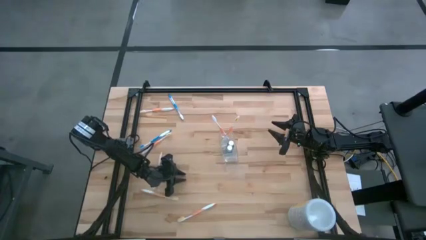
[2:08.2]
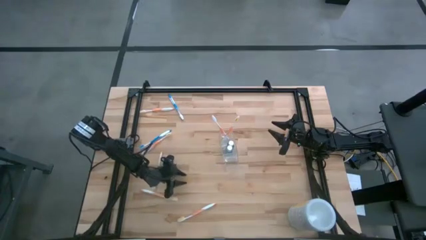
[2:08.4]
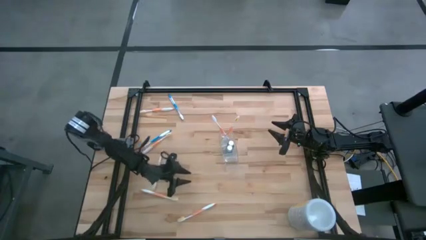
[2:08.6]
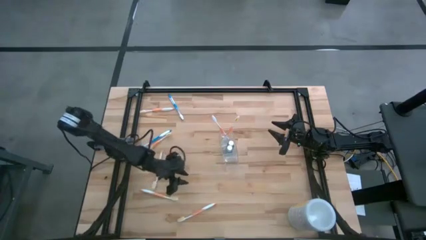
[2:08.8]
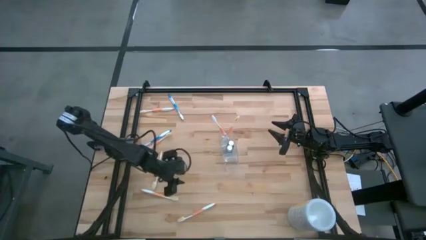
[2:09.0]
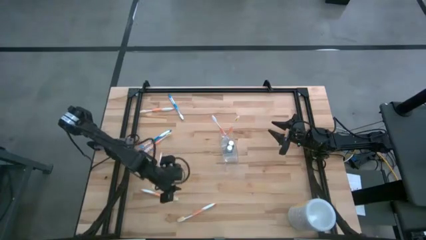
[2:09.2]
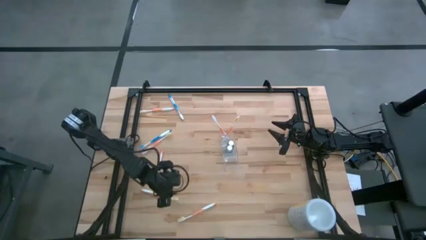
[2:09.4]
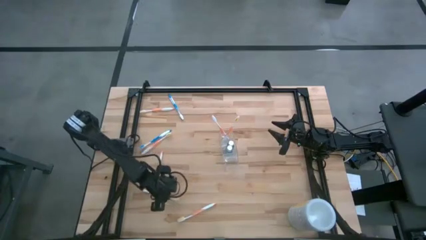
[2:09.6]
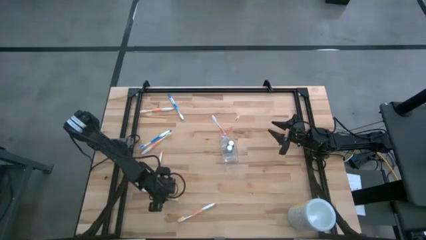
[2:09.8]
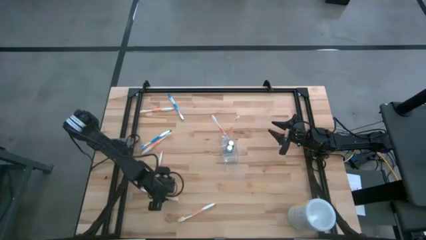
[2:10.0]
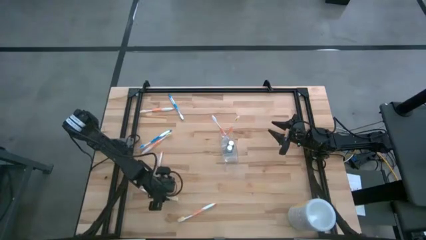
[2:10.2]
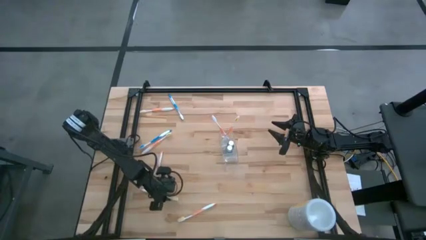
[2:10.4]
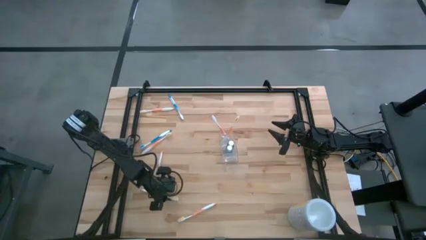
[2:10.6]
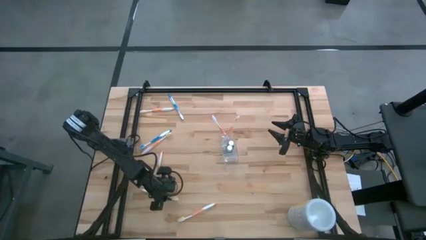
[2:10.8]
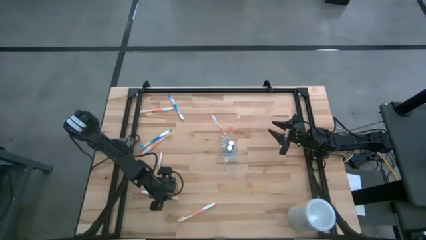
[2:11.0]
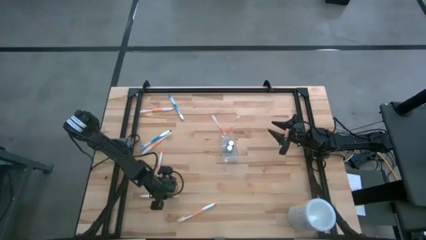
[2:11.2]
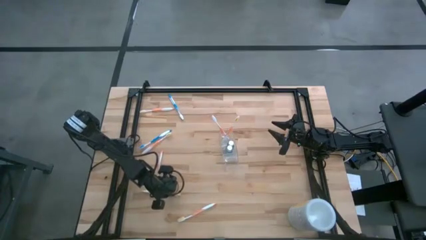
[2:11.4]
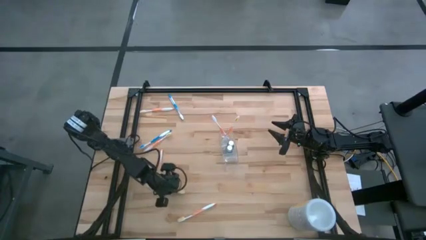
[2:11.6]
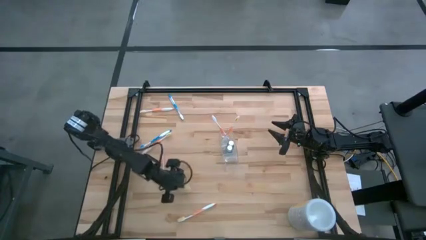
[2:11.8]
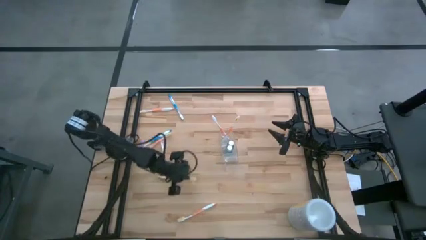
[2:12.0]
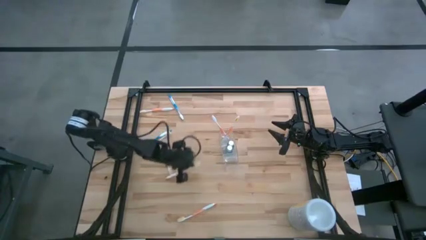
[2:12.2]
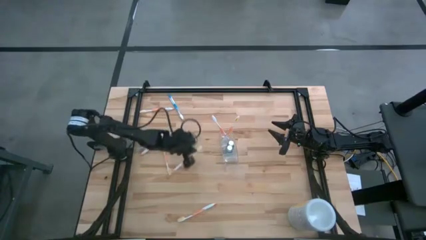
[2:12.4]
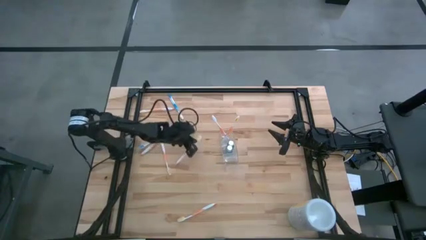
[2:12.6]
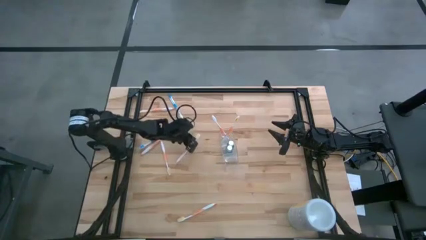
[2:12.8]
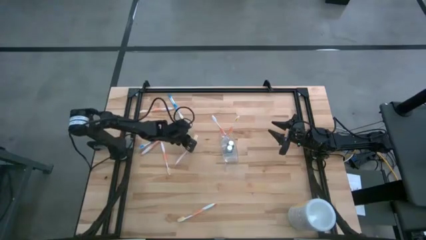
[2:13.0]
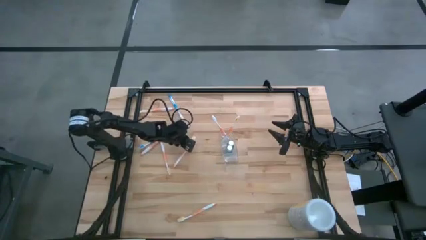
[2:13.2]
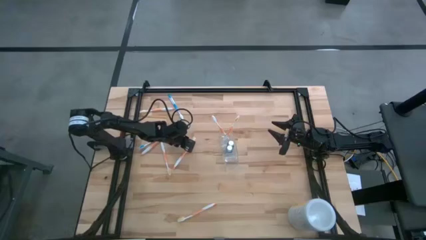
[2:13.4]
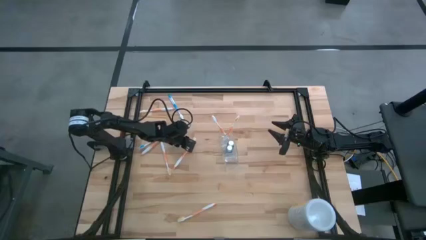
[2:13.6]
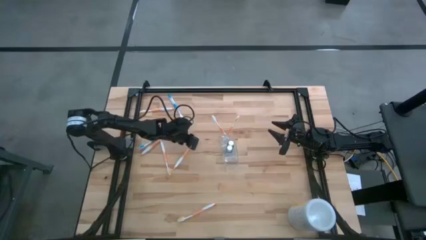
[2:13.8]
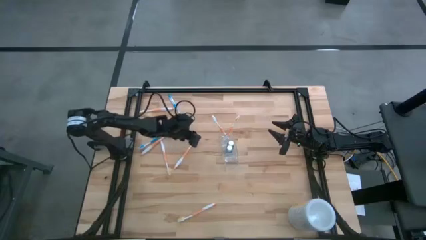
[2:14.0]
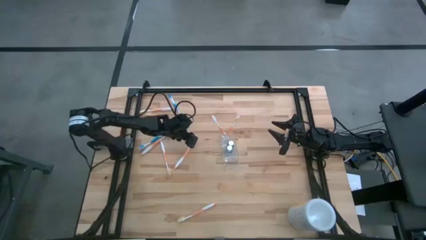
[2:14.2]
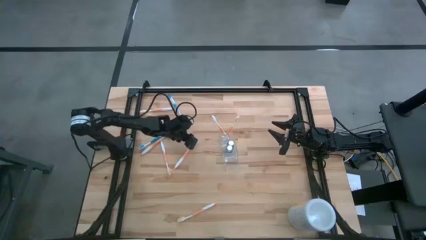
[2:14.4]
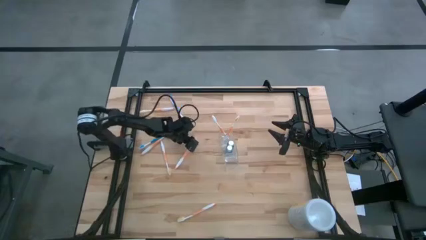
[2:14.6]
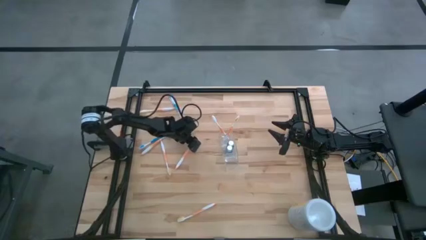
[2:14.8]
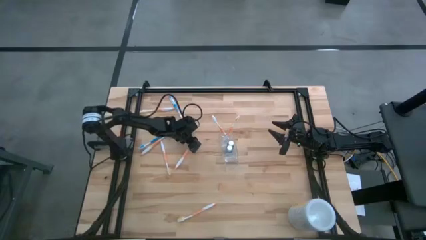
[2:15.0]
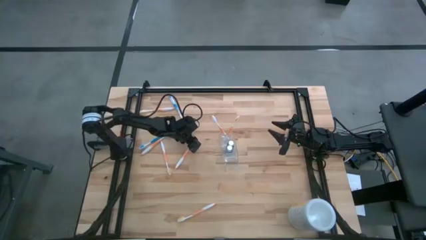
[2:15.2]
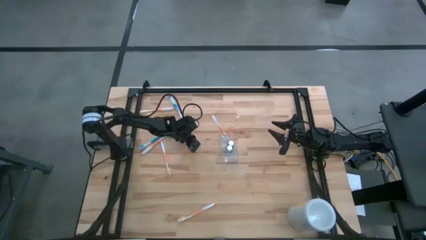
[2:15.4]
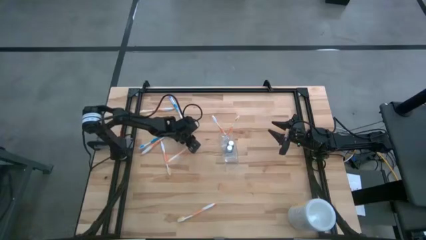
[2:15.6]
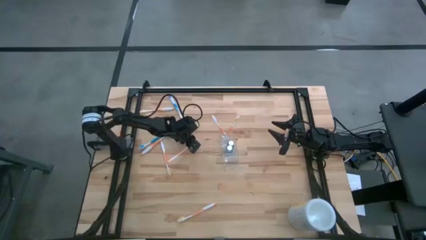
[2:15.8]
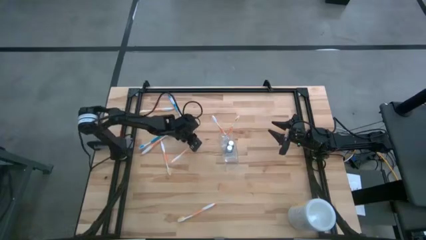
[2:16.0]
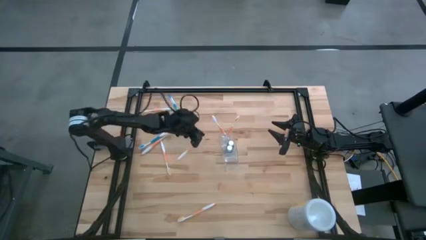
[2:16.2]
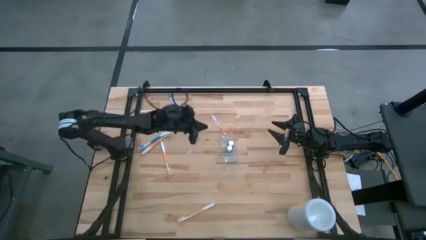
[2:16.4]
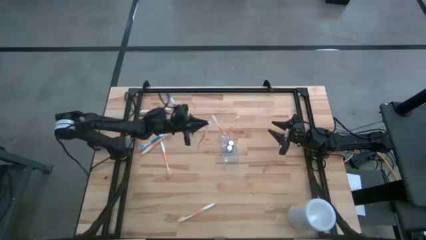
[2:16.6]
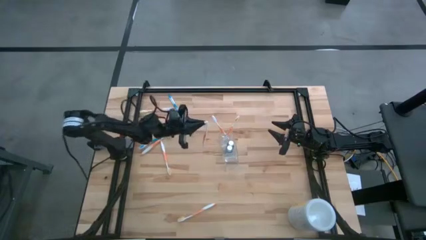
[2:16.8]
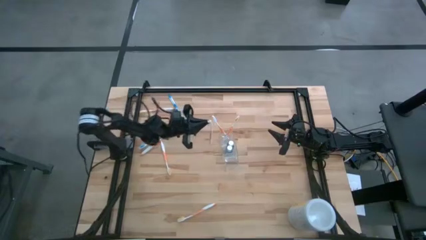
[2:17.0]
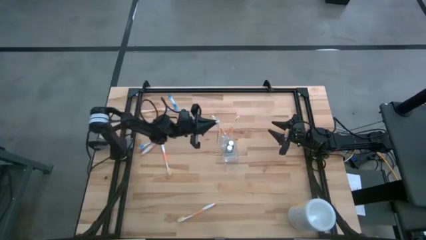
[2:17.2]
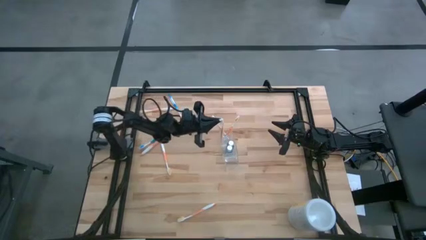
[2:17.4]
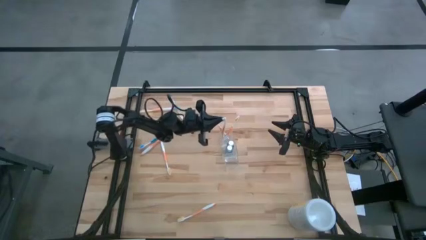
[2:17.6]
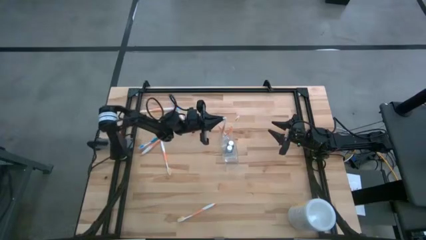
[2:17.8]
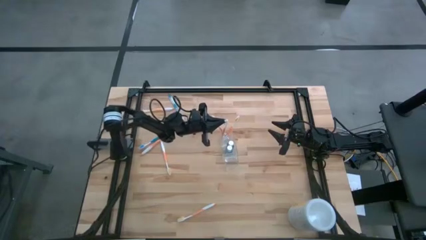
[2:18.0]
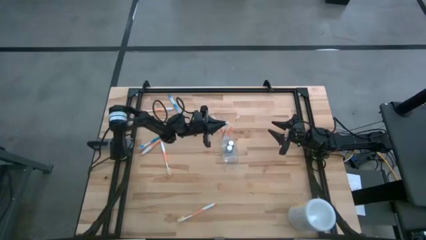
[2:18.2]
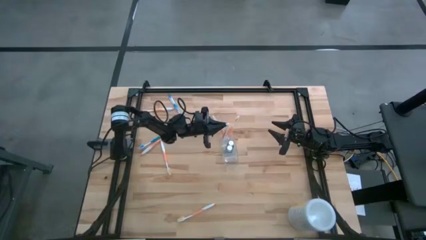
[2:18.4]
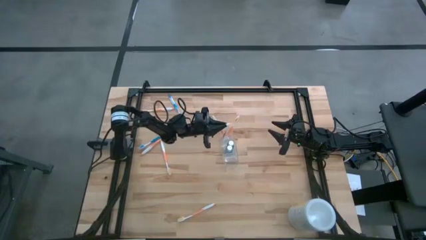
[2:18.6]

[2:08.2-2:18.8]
Task: Pick & Place toothbrushing station
Put the orange toothbrush into the transparent organizer

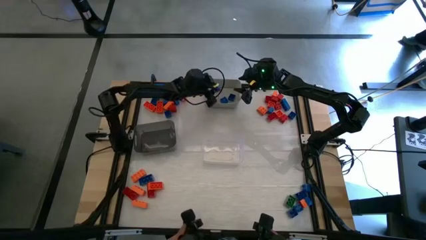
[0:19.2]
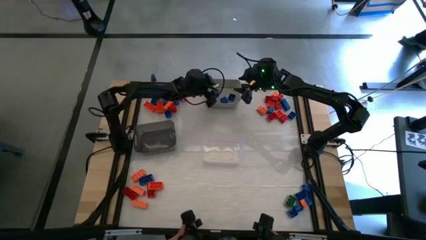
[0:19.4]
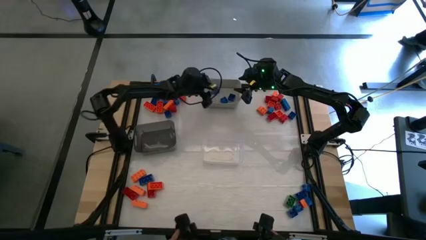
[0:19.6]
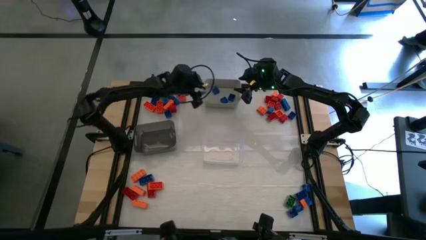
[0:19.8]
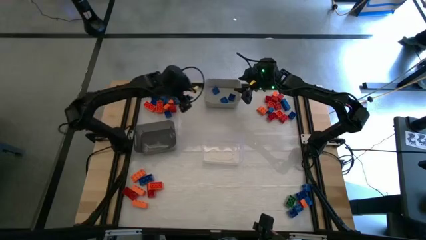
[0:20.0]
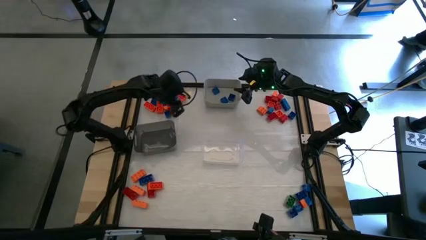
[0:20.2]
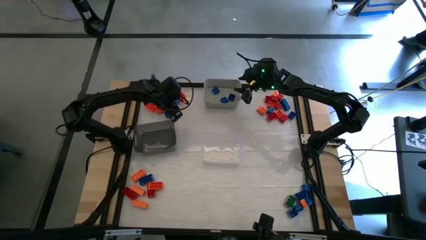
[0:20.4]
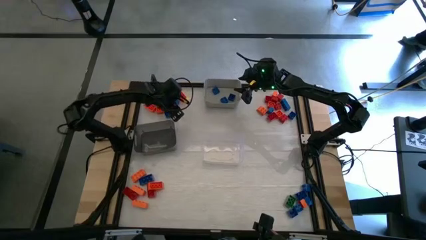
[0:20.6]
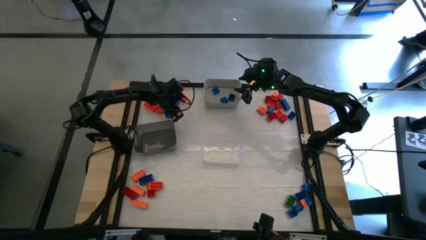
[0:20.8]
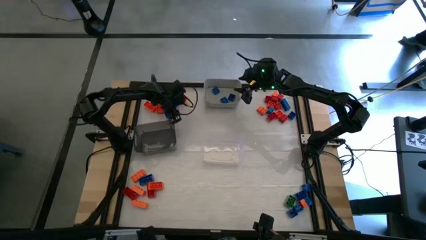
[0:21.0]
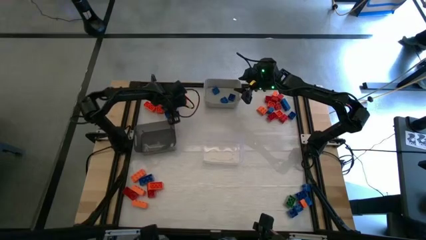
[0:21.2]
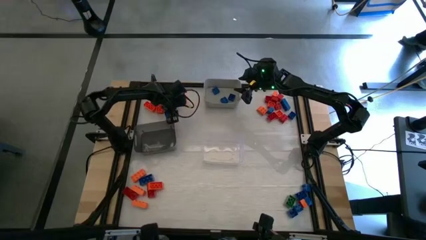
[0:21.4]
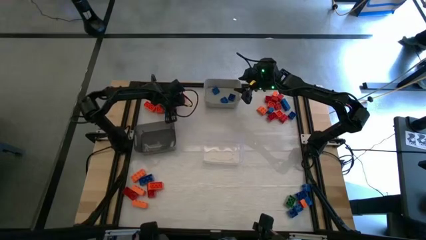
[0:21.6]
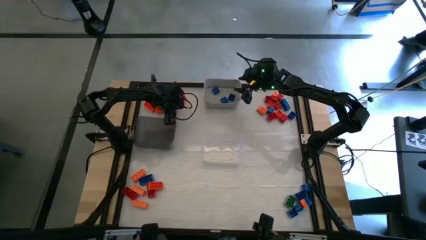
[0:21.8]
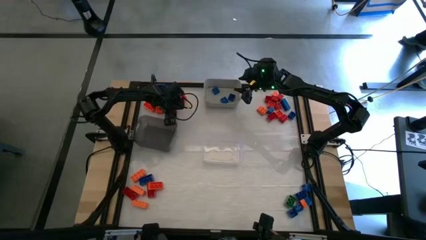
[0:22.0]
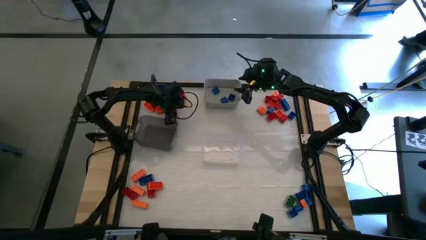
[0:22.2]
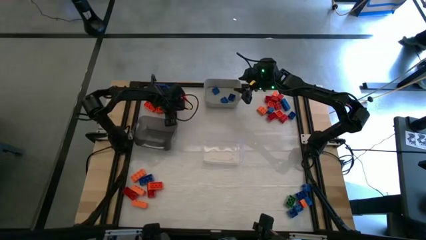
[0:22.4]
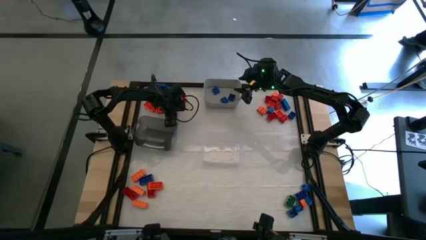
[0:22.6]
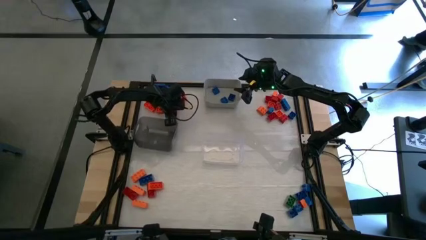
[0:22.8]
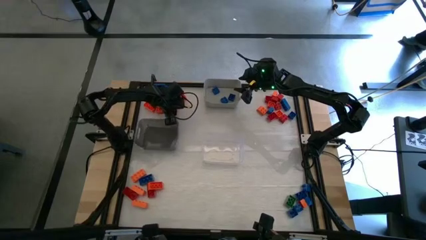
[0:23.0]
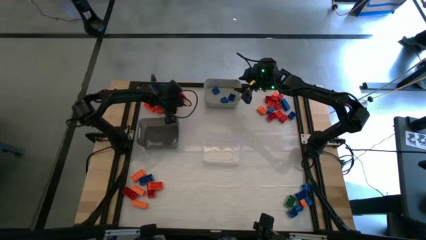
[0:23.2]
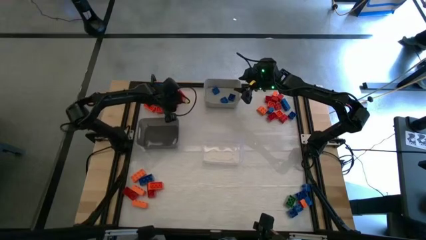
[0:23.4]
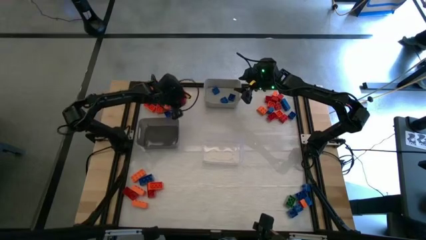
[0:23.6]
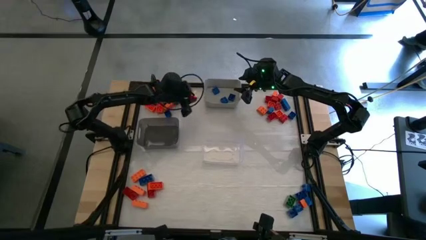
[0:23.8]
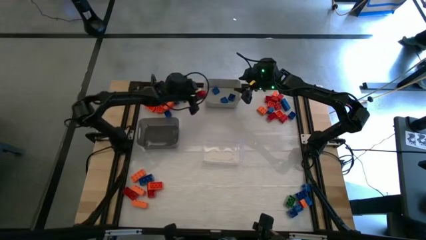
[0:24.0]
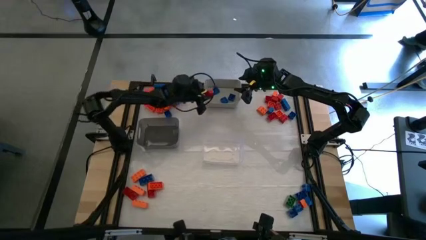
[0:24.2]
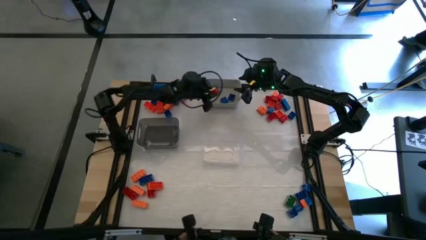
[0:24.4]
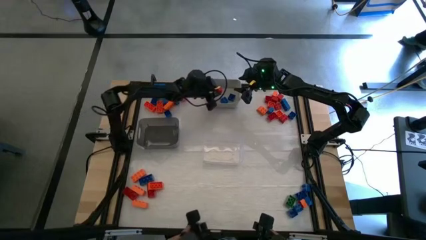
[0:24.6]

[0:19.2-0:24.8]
Task: Sort blocks by size
Put the small red game piece into the gray bin
